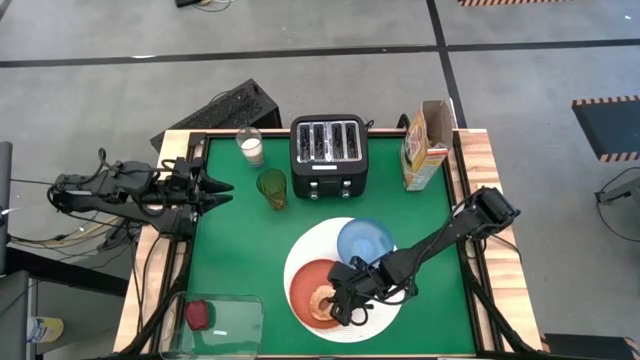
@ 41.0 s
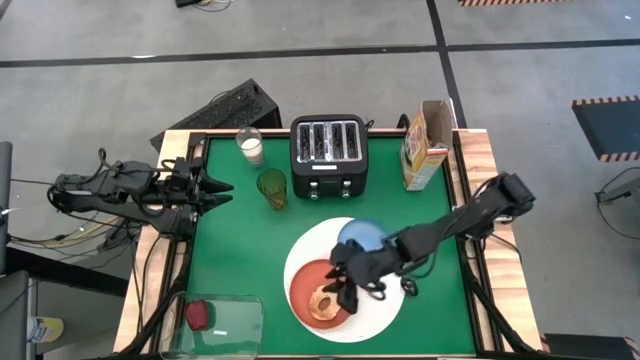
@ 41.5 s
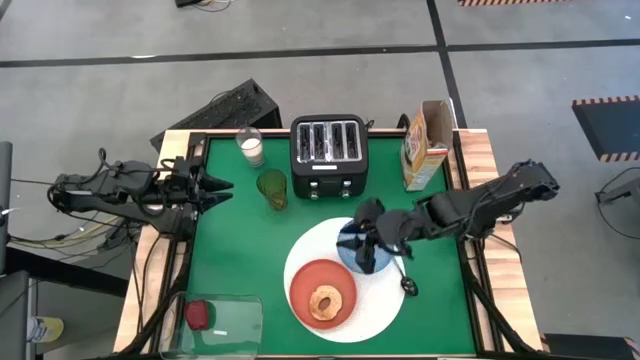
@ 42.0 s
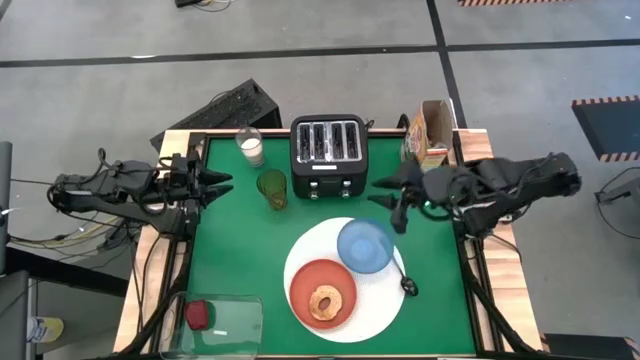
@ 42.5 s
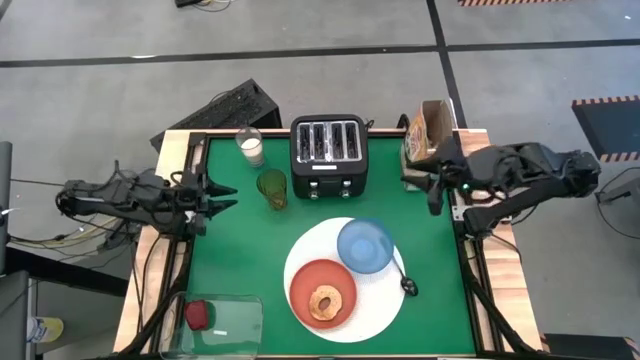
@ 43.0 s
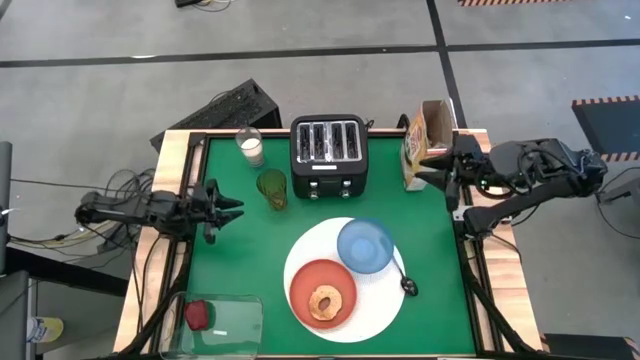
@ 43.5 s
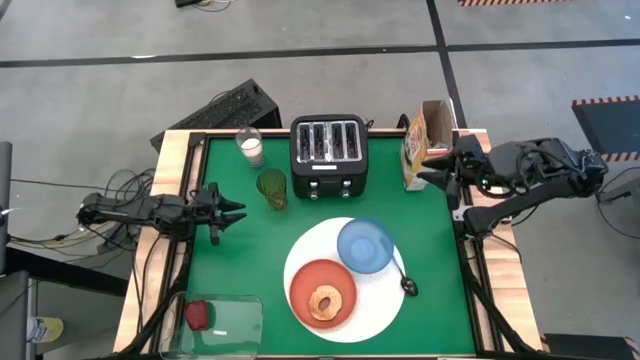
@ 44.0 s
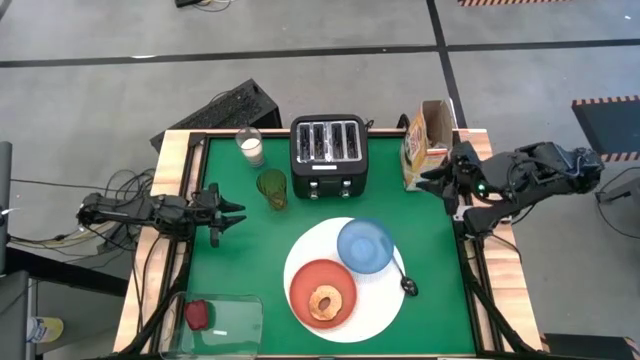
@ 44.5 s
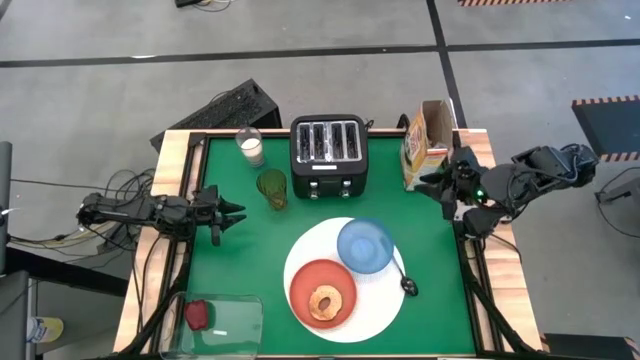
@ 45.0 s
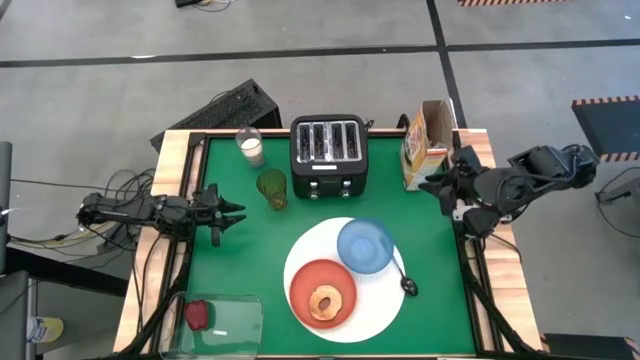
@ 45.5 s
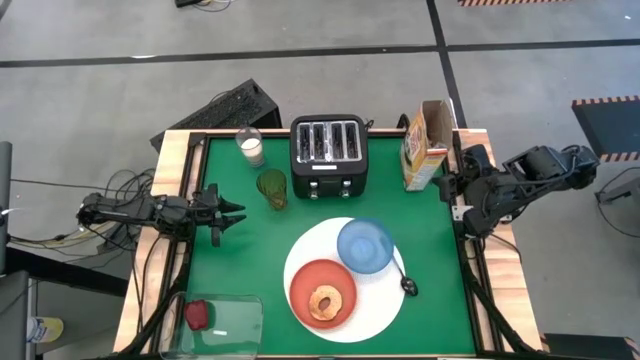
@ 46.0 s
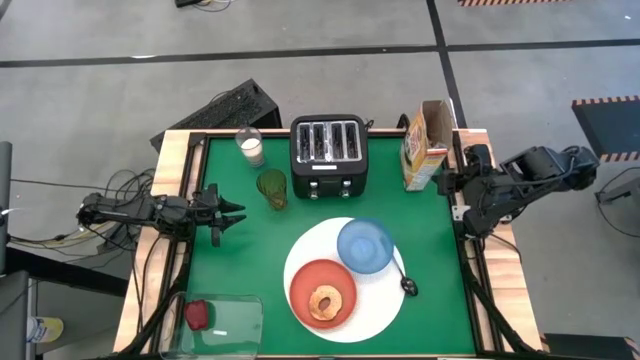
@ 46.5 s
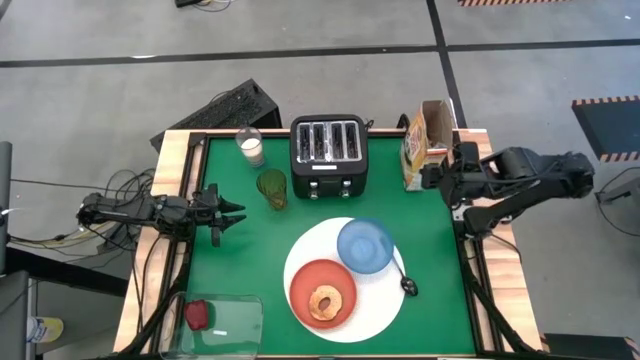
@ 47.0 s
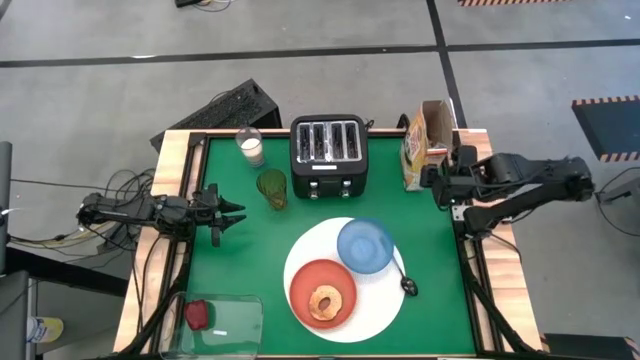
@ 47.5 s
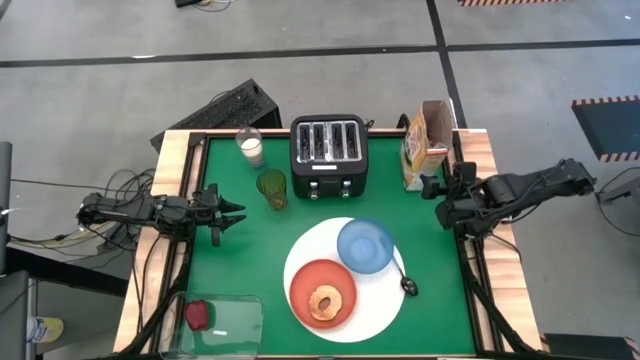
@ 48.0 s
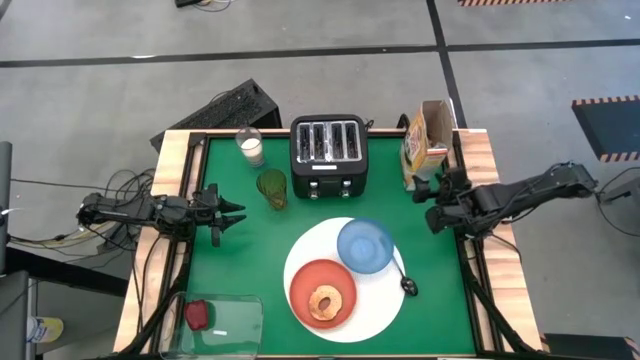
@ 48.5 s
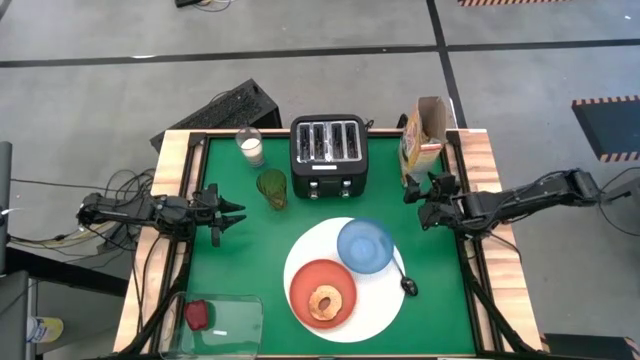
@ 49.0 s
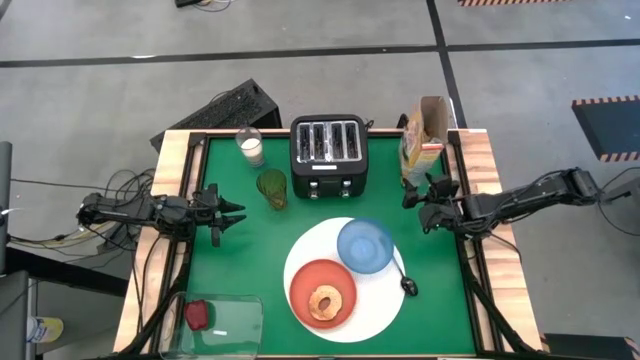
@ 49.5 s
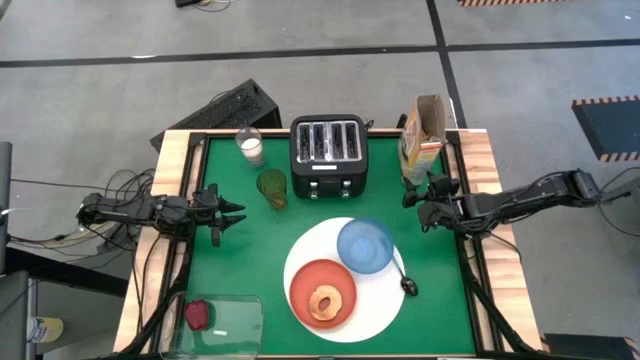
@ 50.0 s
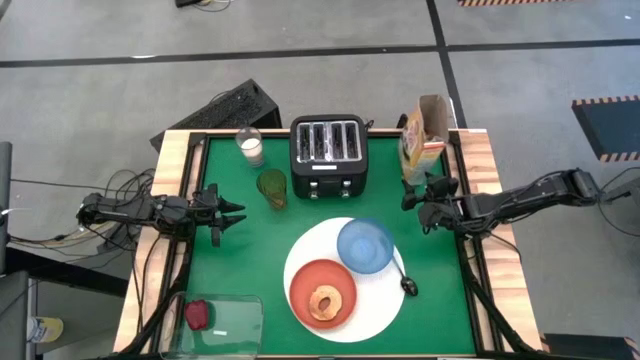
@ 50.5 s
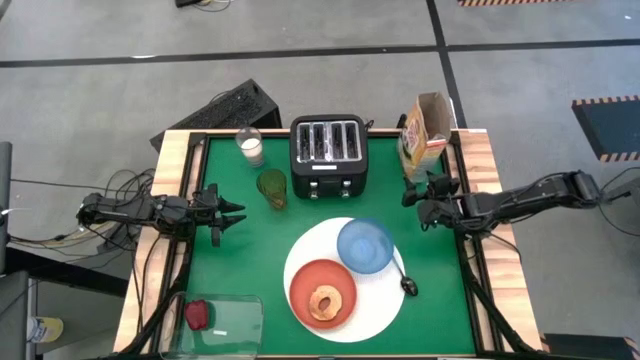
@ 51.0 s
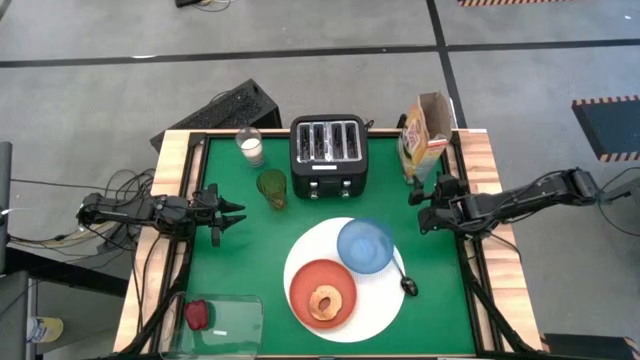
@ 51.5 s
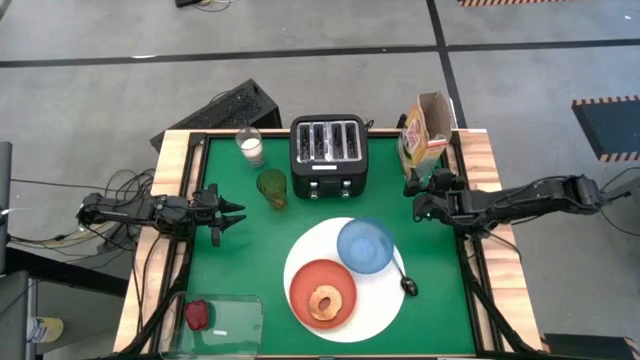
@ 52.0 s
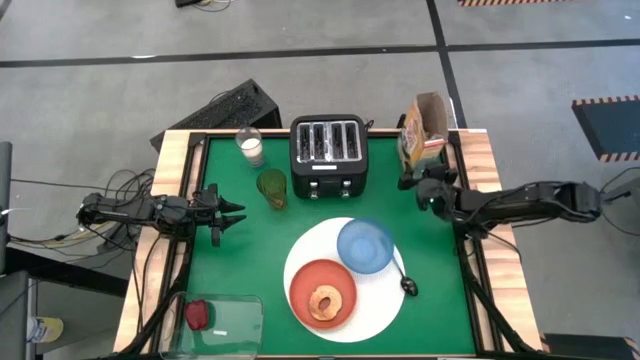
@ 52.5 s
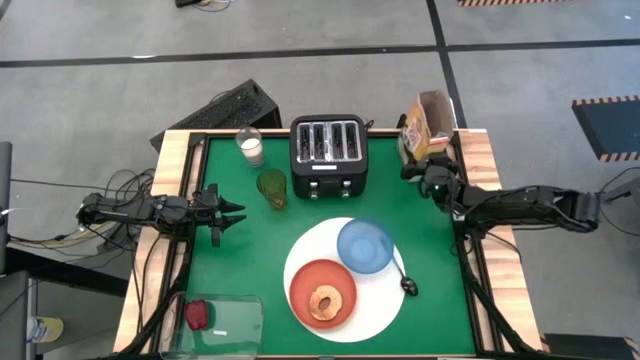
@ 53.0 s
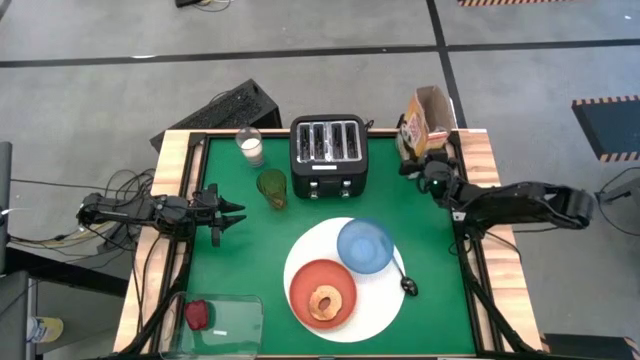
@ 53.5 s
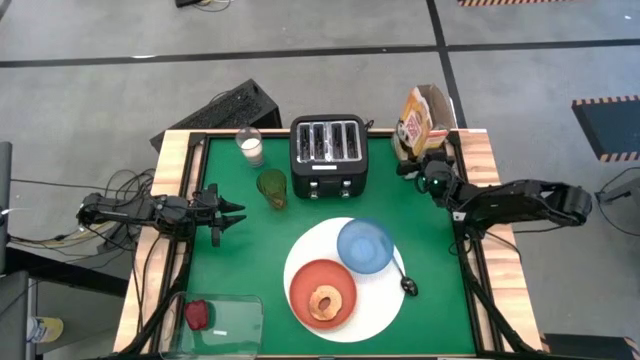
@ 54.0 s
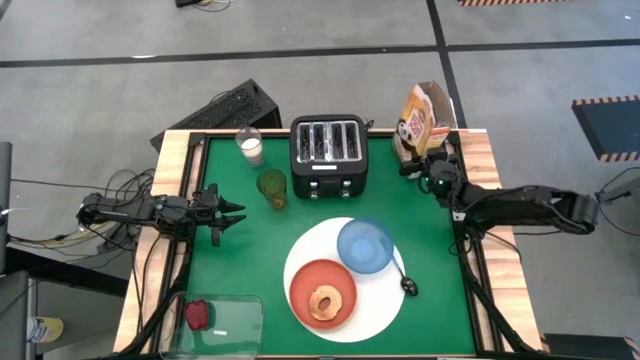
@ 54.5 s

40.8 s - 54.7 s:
Task: Arrange a breakfast setting
Pour the cereal from the cereal box into the blue bowl

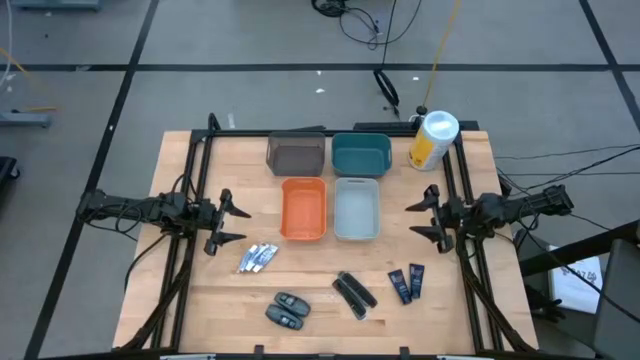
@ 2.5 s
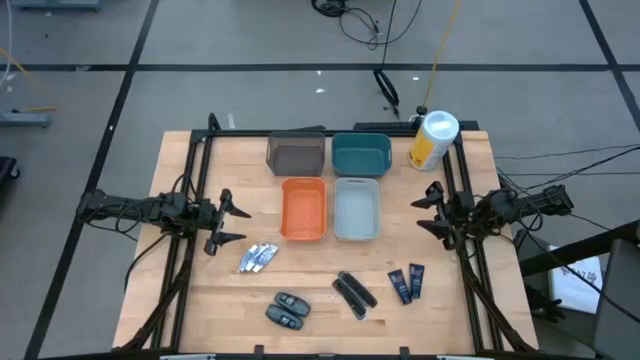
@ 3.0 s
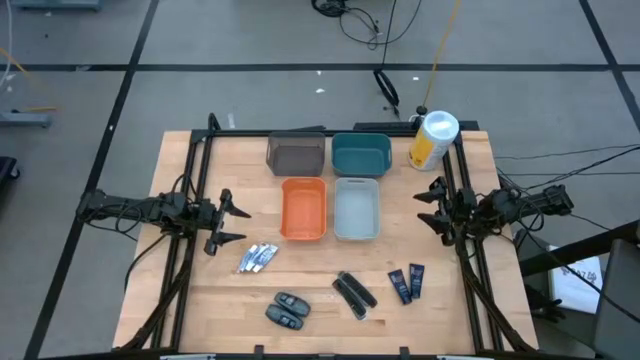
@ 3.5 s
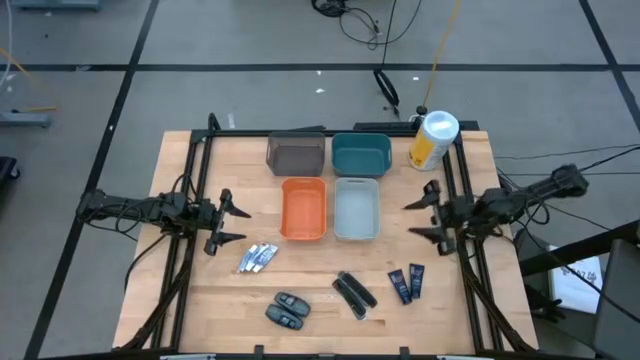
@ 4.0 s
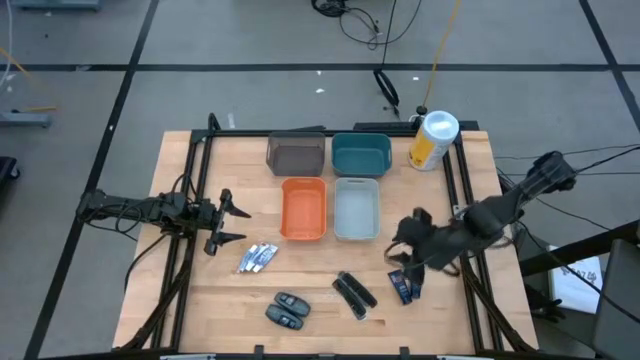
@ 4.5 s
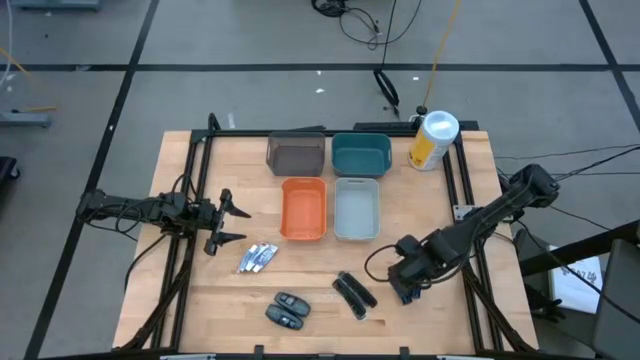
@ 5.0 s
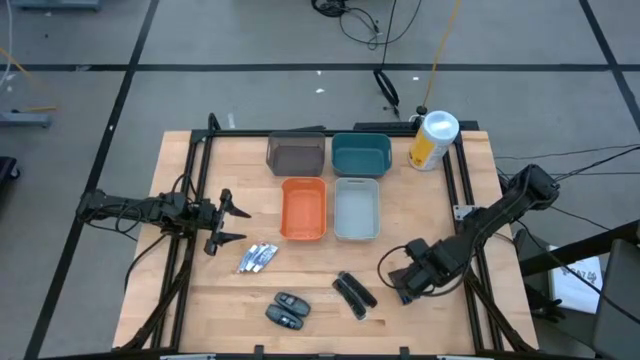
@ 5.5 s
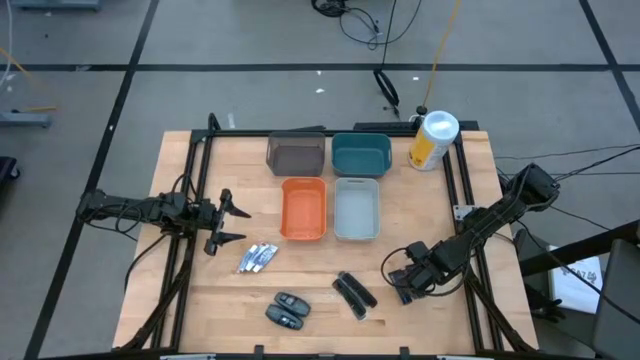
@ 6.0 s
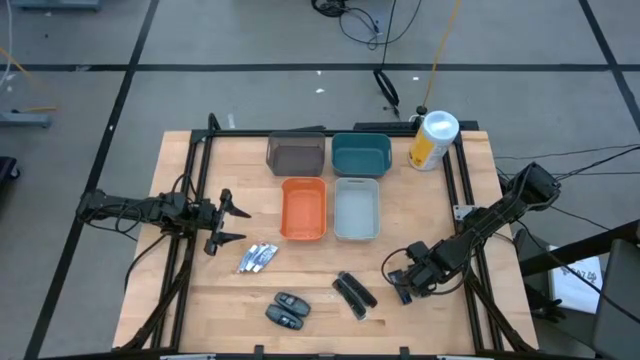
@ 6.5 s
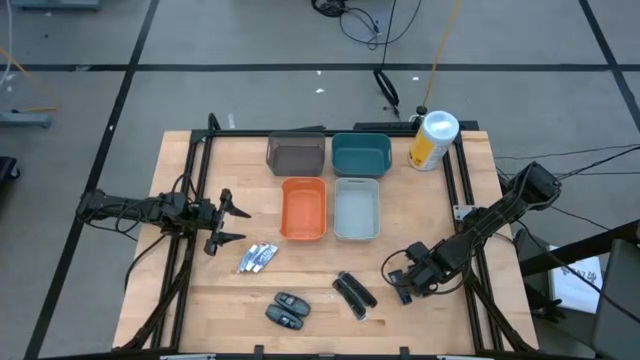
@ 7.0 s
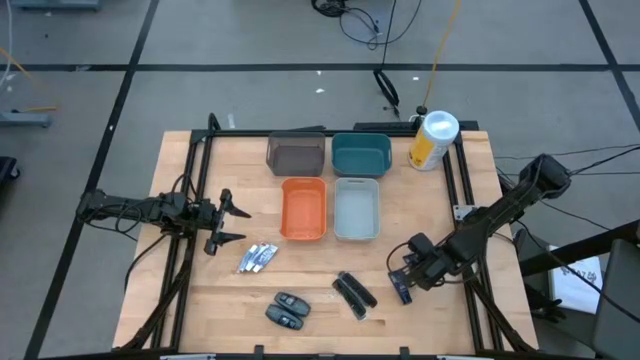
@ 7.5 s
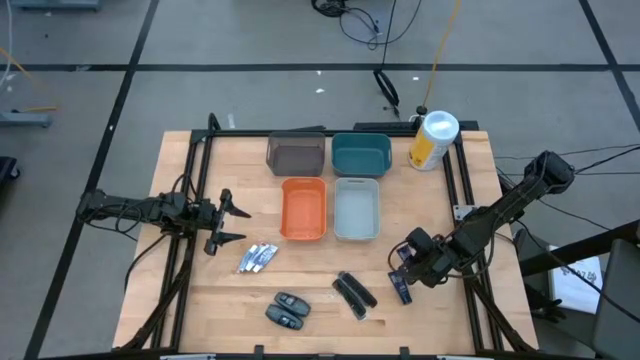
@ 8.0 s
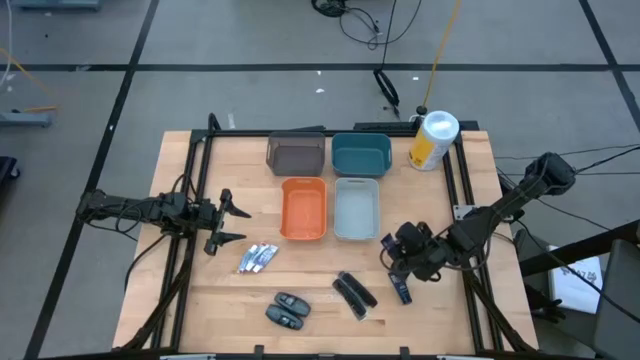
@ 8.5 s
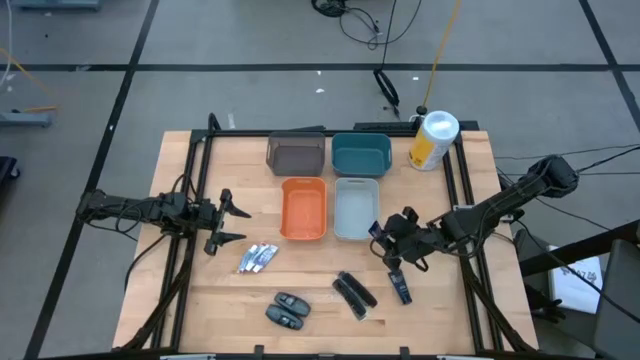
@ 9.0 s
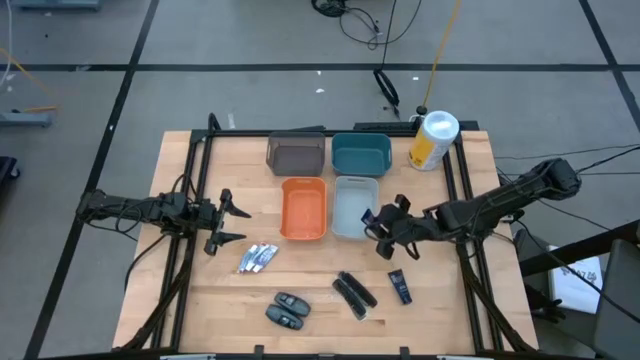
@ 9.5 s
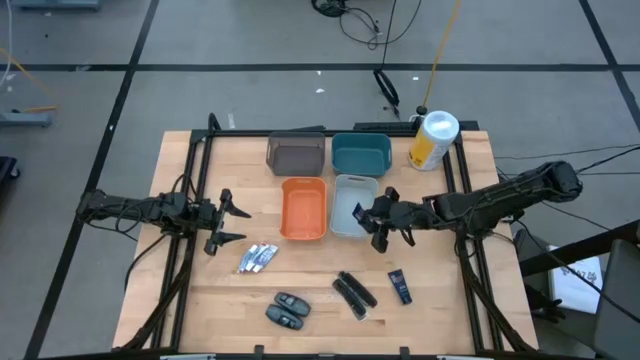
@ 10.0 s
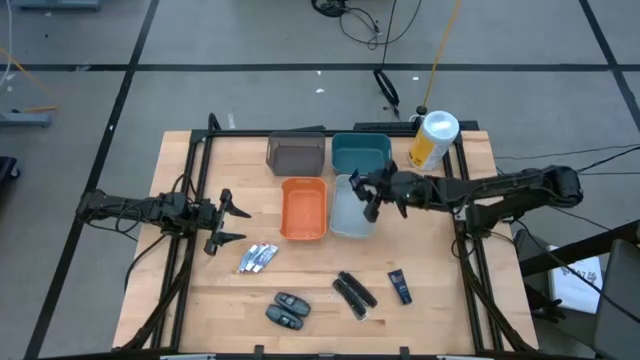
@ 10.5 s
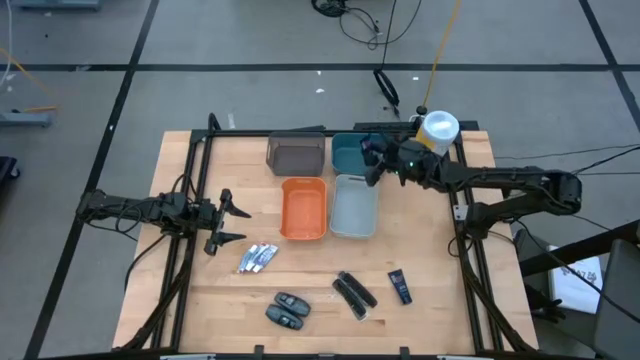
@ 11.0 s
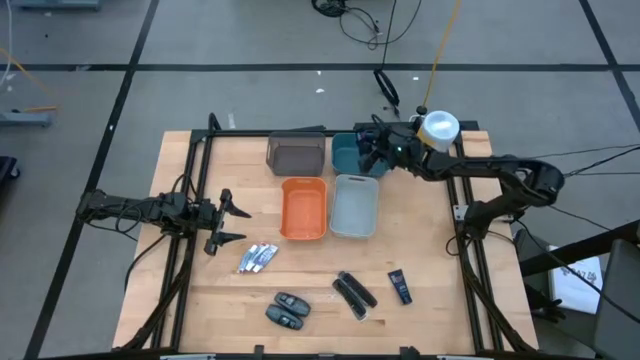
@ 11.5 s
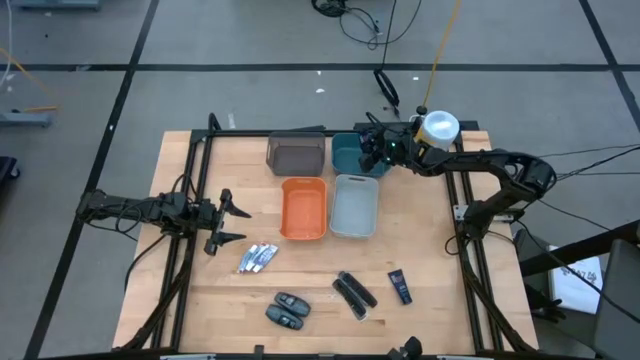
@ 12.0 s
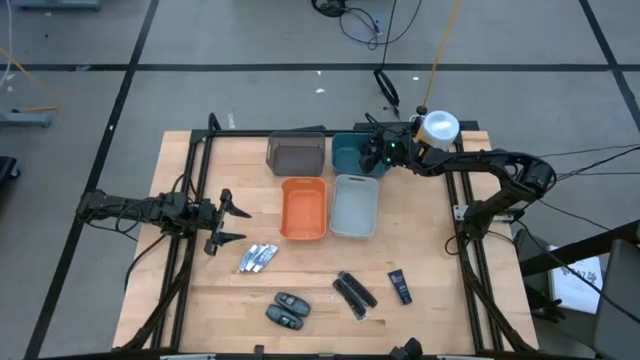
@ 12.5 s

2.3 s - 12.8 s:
Task: Pick & Place Travel size toiletries
Put the right blue shave cream into the dark blue bin
